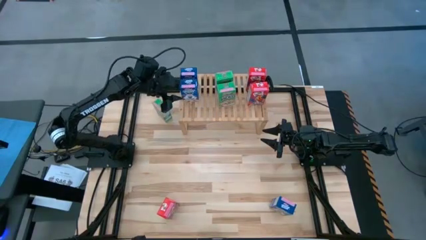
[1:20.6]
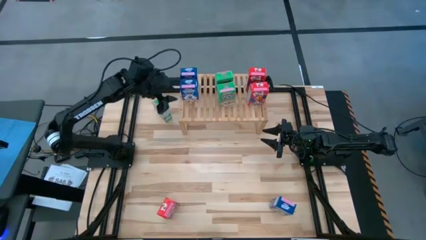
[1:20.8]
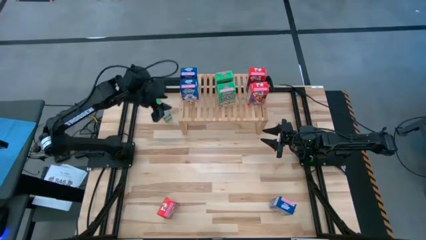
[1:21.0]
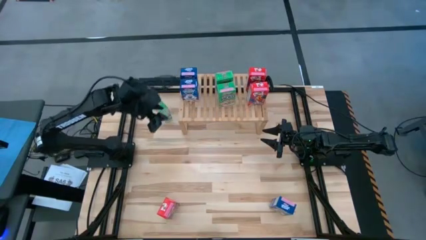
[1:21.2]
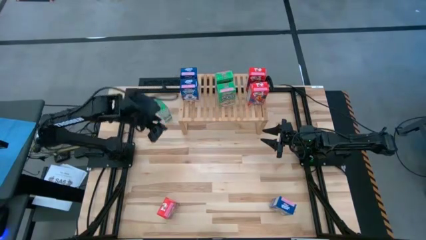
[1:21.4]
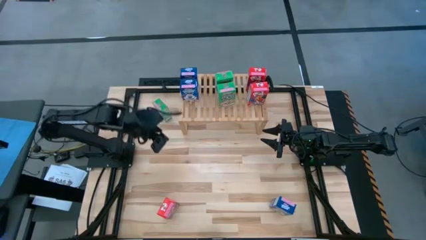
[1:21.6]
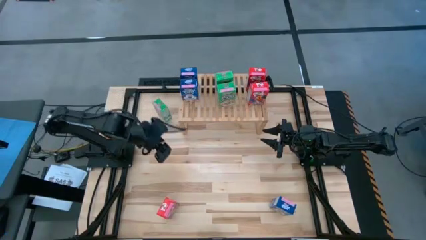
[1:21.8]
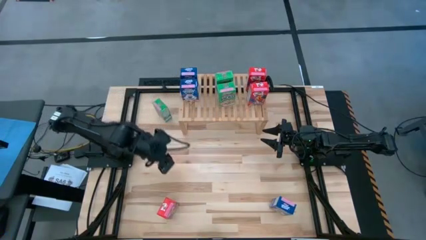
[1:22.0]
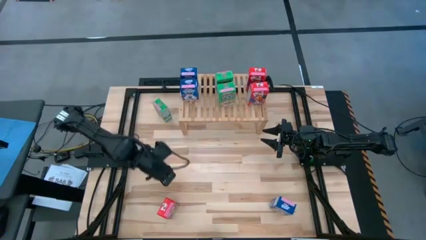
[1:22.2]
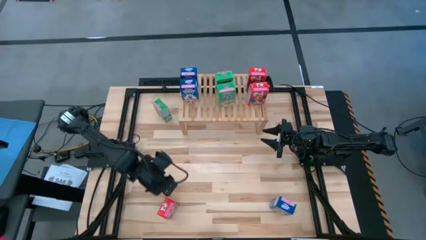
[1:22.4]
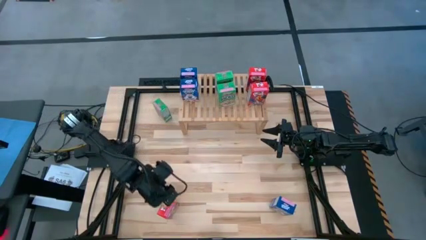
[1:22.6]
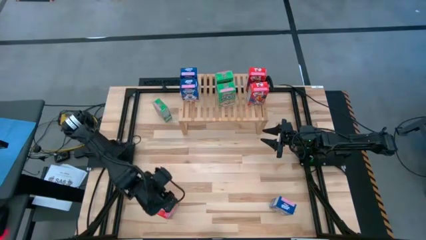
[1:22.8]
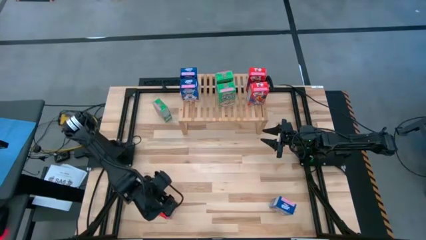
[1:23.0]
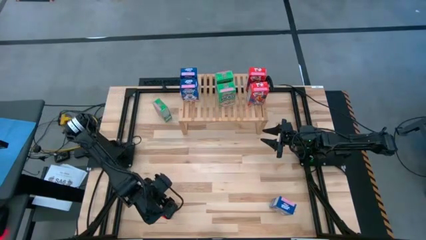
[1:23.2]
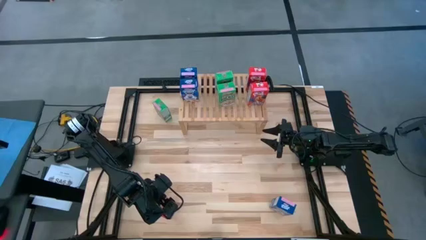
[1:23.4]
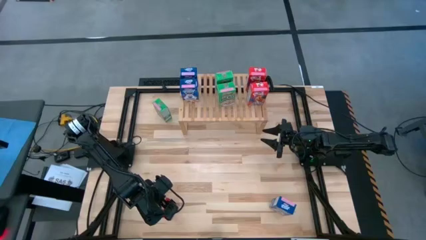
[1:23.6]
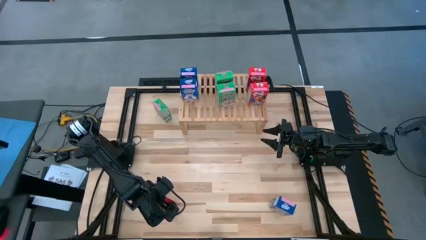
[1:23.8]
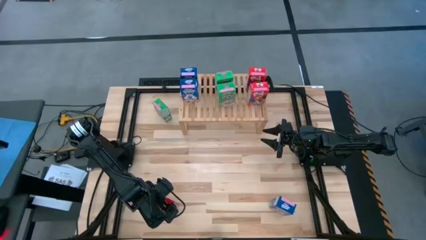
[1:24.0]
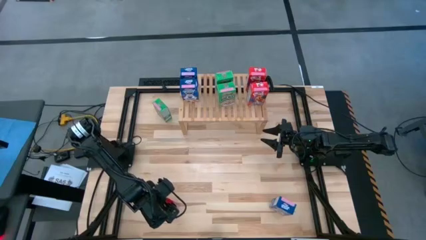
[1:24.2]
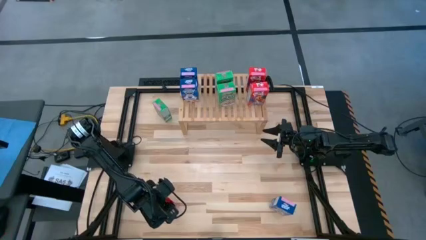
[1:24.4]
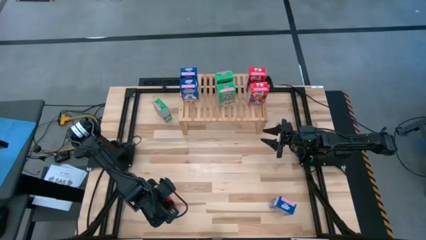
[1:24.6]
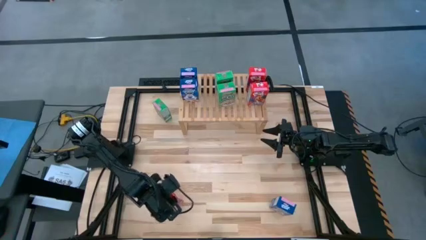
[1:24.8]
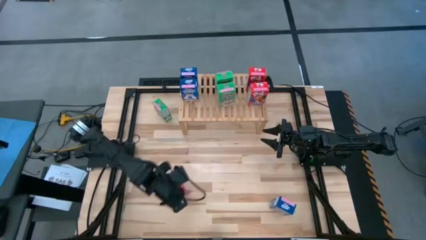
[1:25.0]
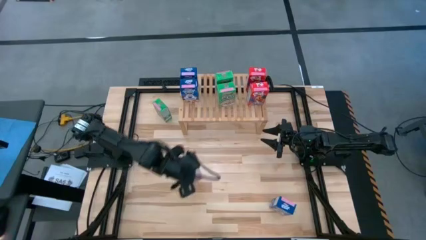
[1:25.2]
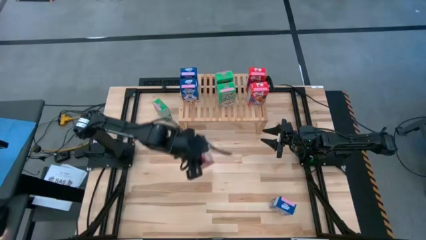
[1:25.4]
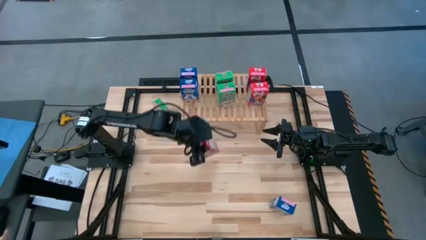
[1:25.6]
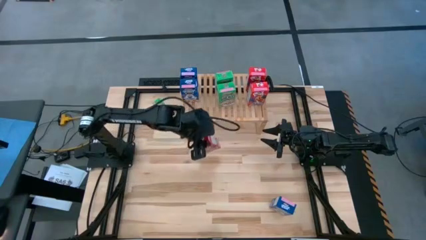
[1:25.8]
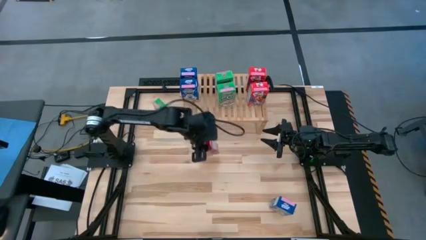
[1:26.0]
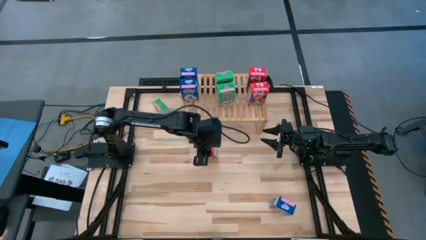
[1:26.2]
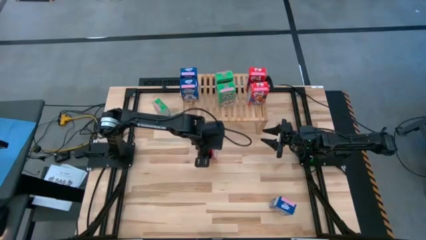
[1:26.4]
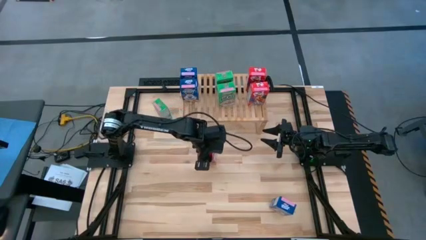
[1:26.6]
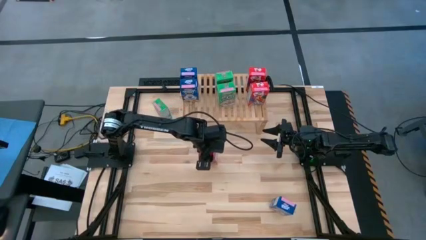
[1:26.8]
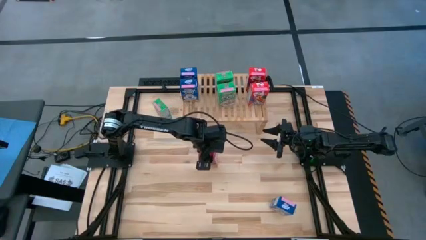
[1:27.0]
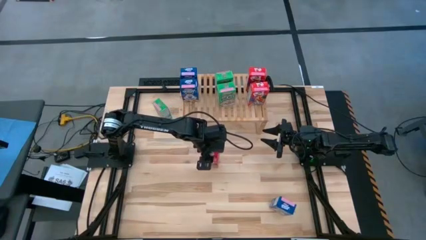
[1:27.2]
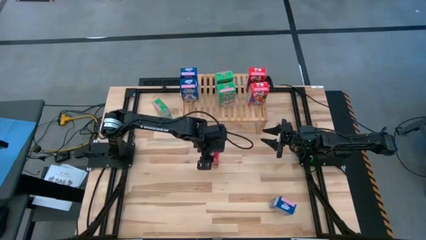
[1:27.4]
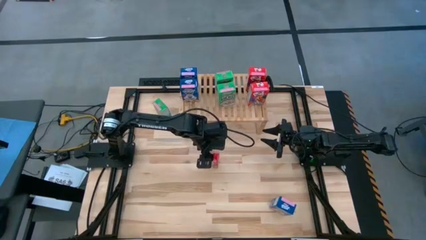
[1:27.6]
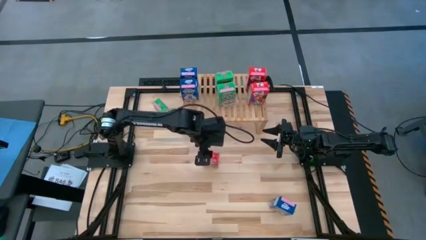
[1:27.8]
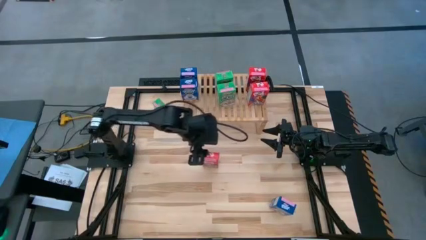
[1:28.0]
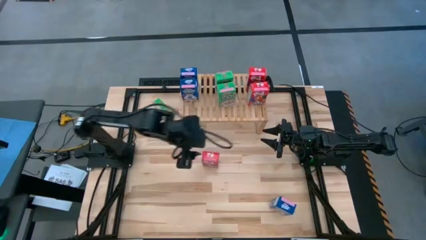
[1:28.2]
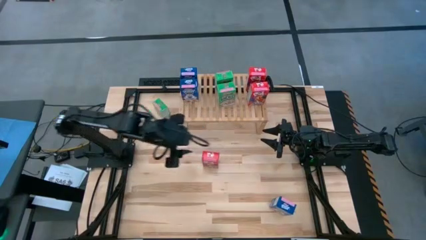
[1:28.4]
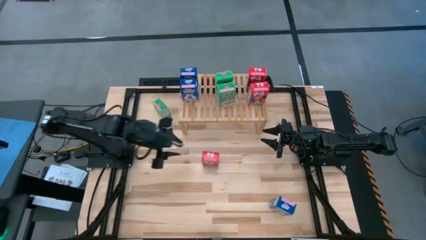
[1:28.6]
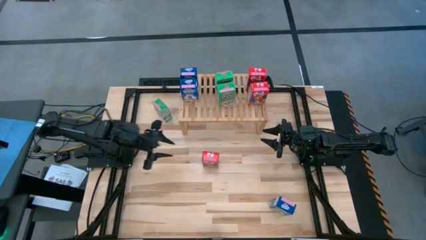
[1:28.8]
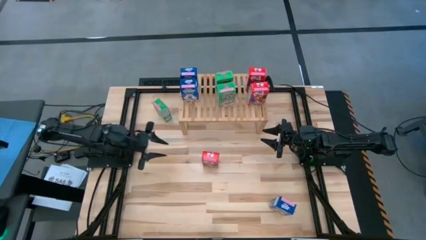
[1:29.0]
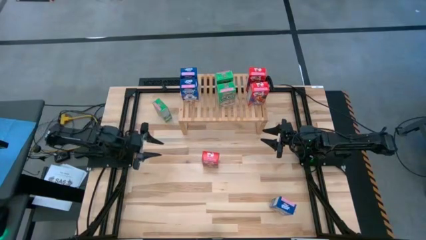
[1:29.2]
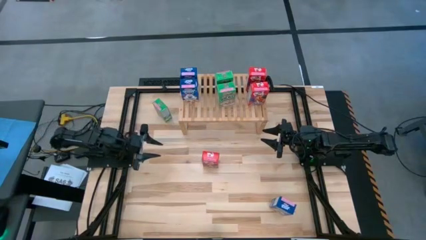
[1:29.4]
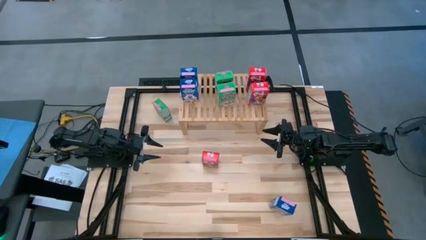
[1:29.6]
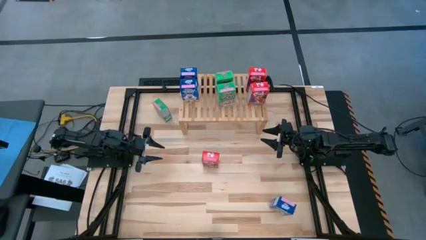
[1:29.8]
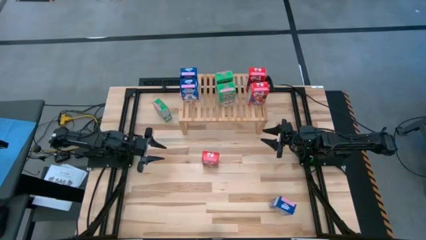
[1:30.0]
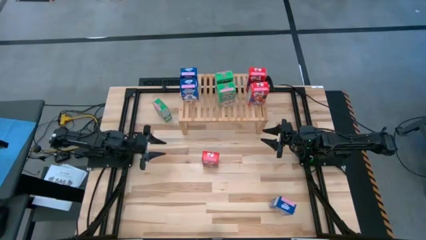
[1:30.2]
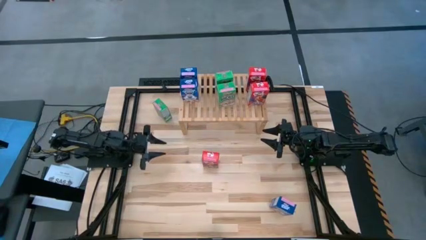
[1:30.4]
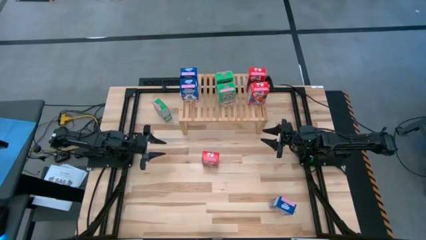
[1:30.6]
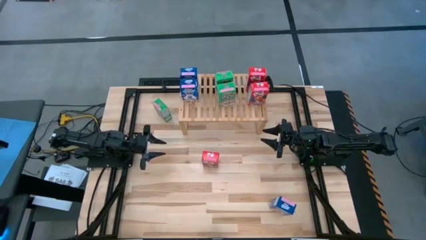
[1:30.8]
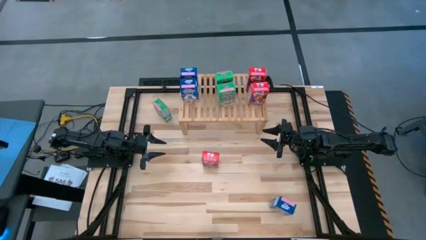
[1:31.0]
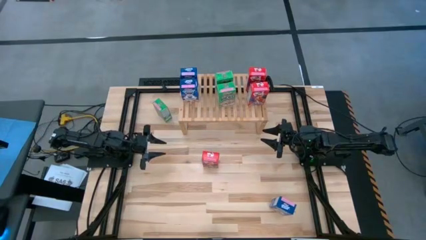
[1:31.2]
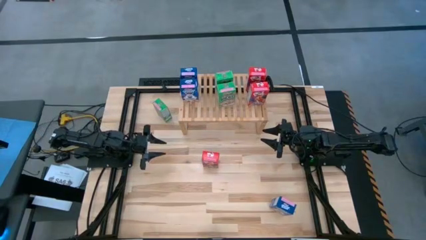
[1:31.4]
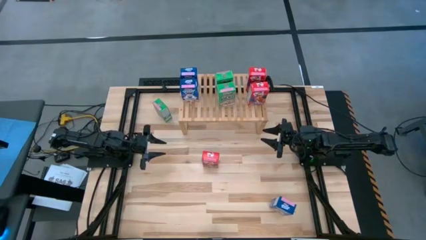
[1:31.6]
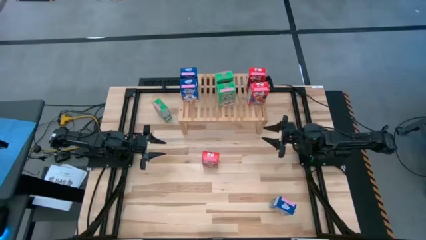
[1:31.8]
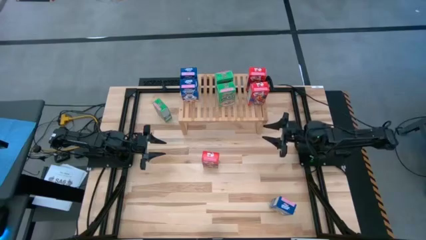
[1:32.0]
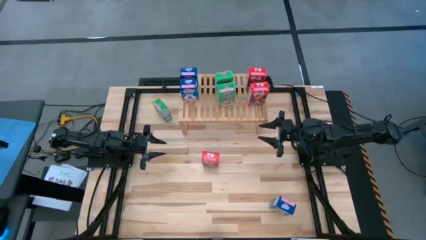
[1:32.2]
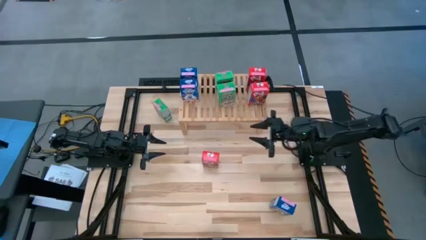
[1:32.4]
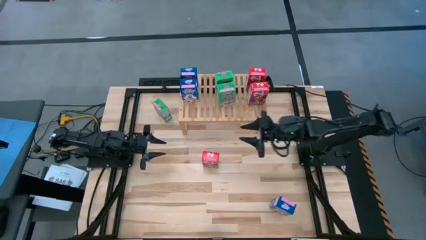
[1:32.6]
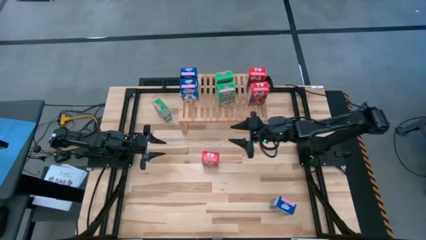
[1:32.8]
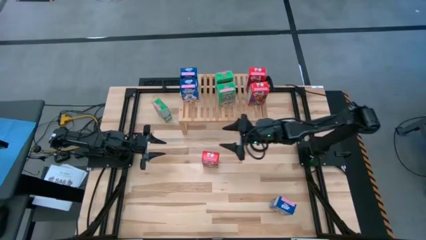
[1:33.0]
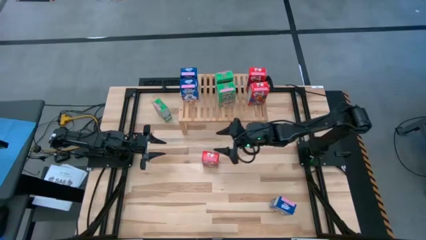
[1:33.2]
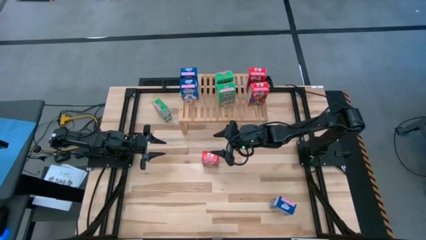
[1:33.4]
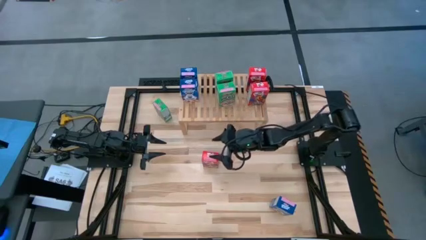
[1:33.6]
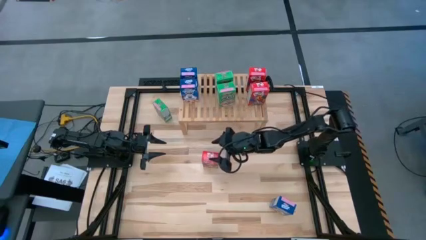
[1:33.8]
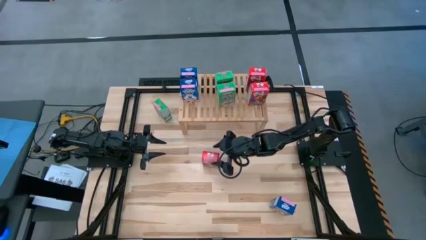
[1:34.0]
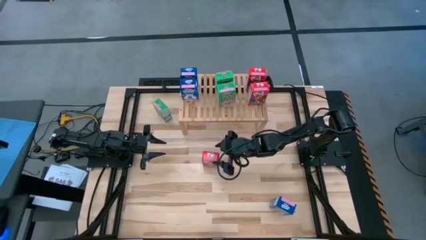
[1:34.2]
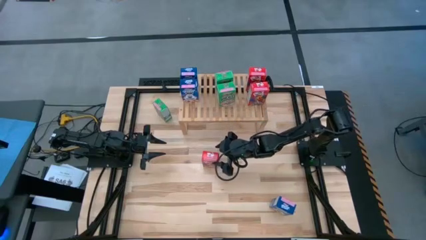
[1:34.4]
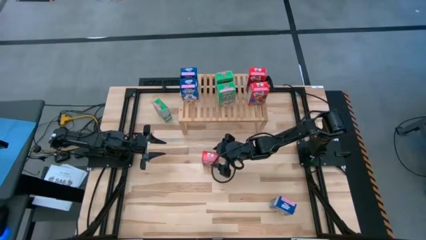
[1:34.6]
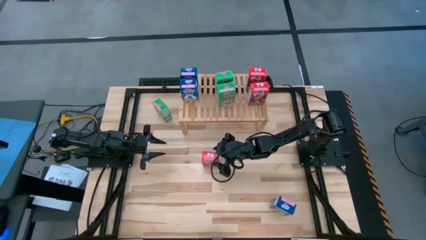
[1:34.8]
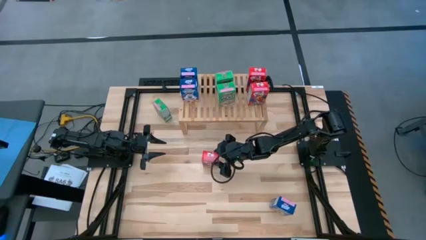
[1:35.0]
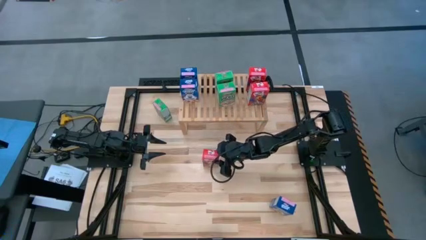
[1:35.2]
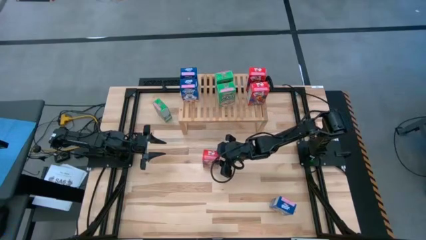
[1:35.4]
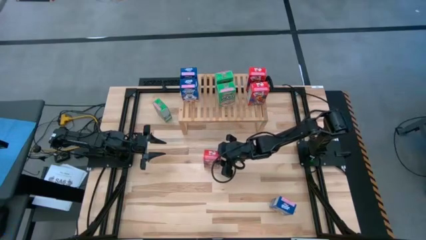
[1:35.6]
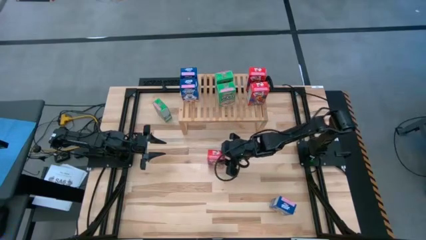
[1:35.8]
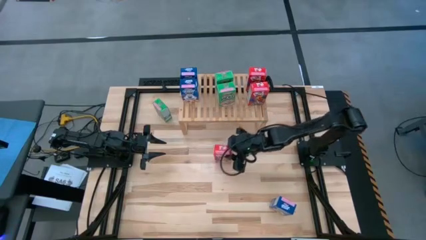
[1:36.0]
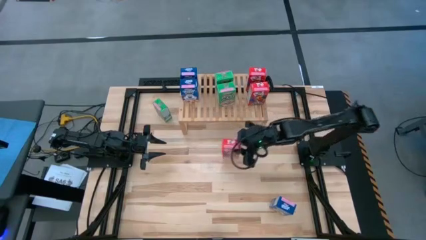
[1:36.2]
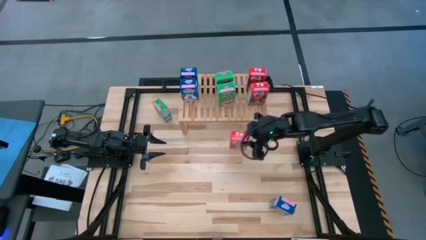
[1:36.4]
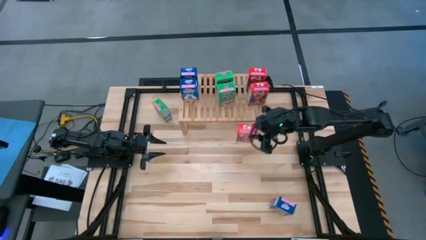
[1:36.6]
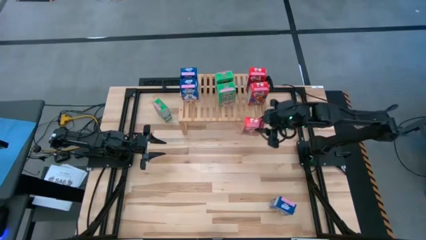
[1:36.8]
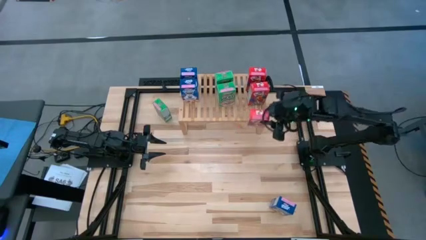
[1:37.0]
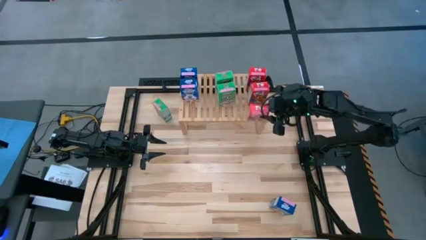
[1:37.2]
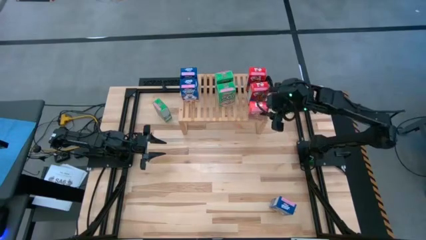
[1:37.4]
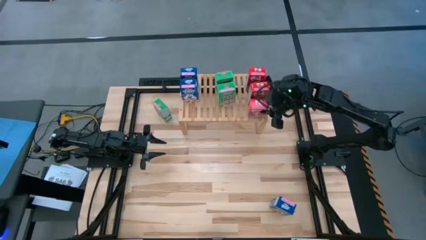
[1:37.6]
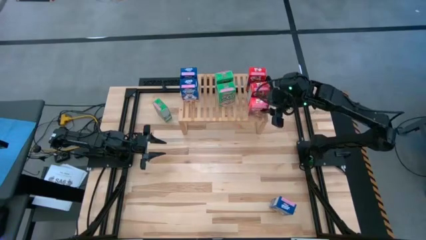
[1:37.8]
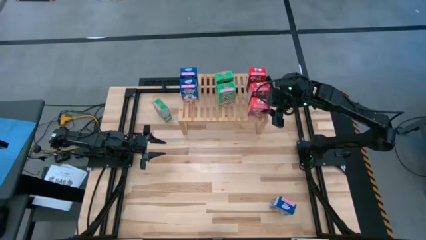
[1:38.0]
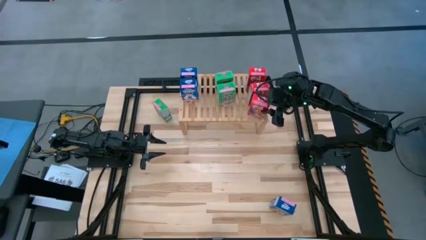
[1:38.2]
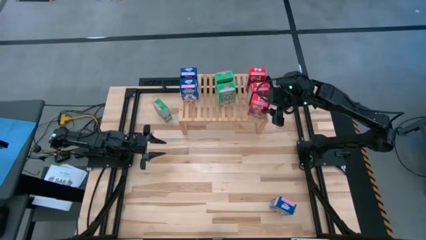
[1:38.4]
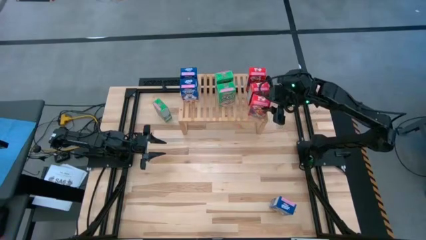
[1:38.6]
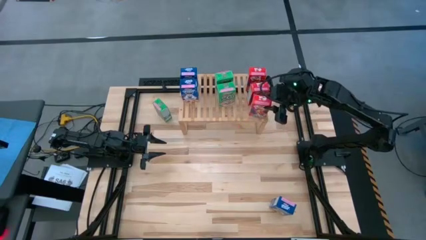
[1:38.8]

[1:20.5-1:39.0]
Task: Stack cereal on shelf
Put the red cereal box on the shelf aligned with the other red cereal box
